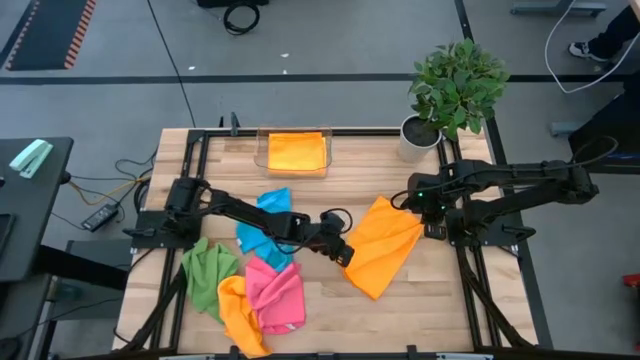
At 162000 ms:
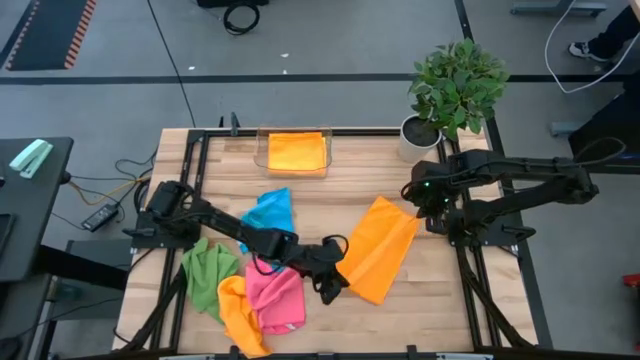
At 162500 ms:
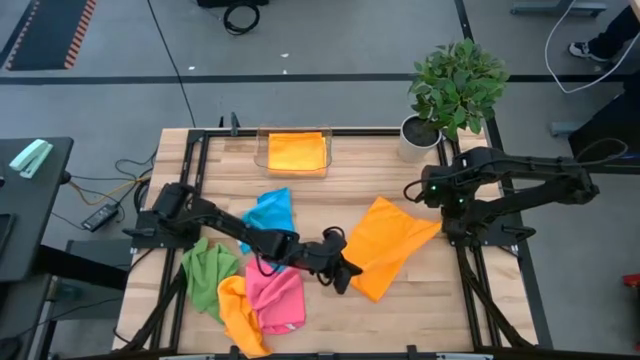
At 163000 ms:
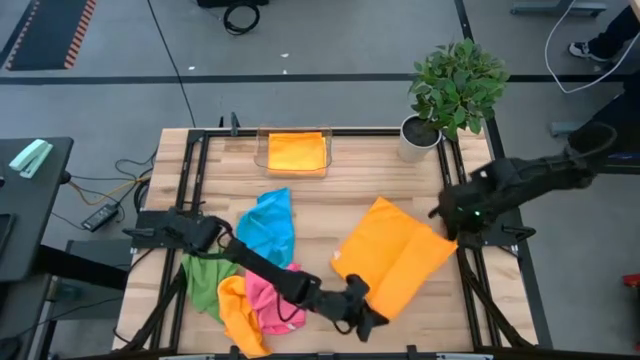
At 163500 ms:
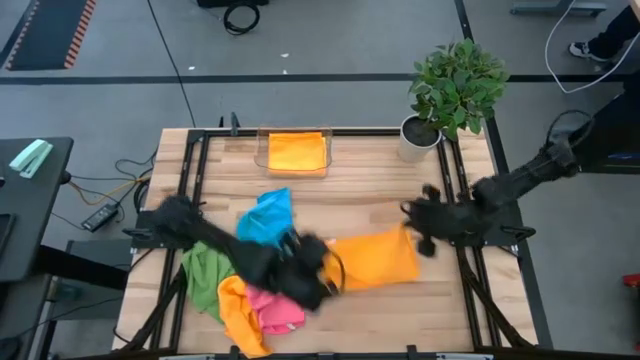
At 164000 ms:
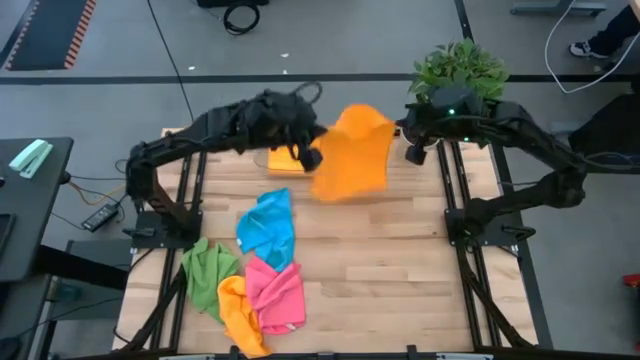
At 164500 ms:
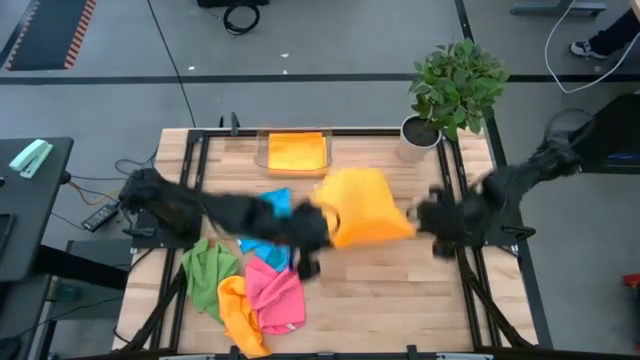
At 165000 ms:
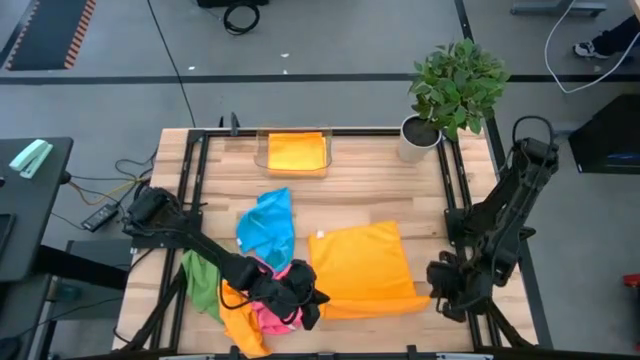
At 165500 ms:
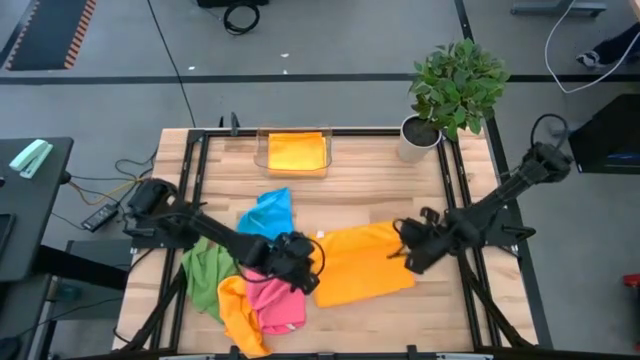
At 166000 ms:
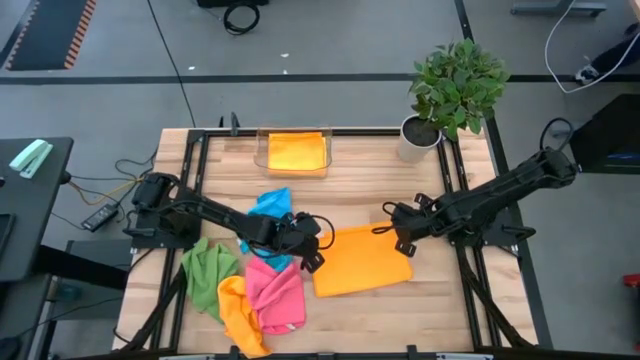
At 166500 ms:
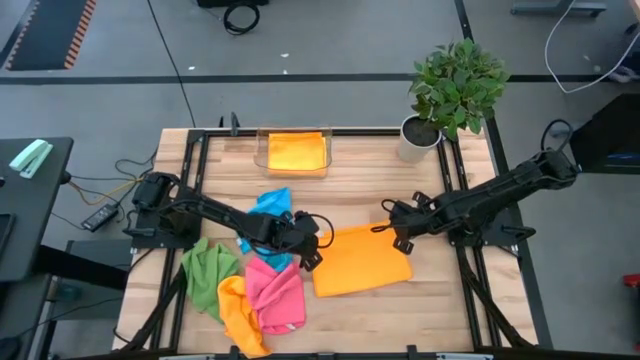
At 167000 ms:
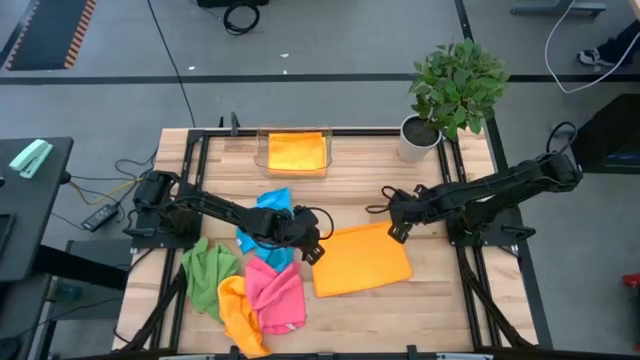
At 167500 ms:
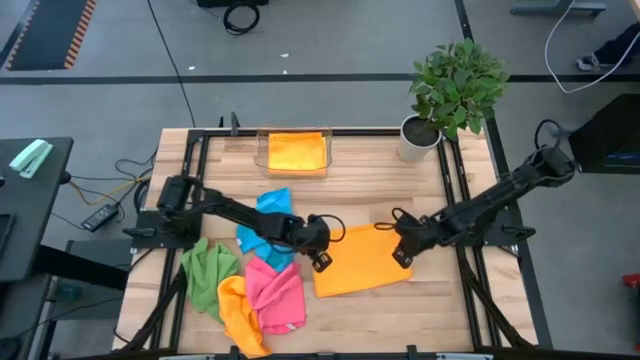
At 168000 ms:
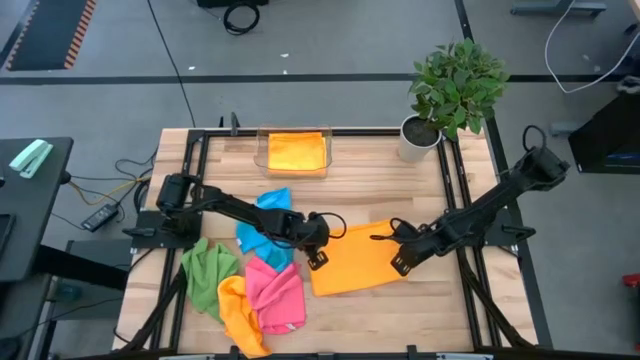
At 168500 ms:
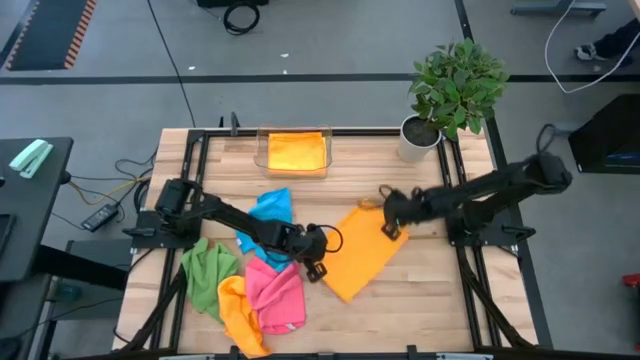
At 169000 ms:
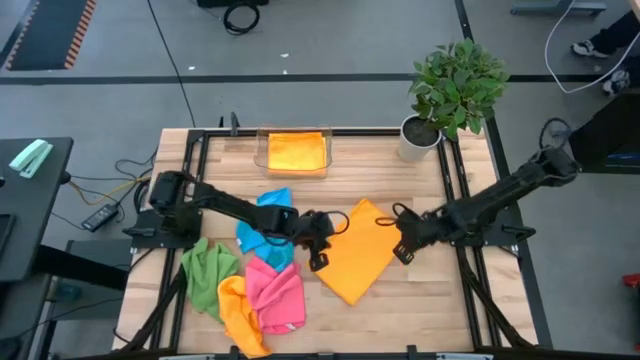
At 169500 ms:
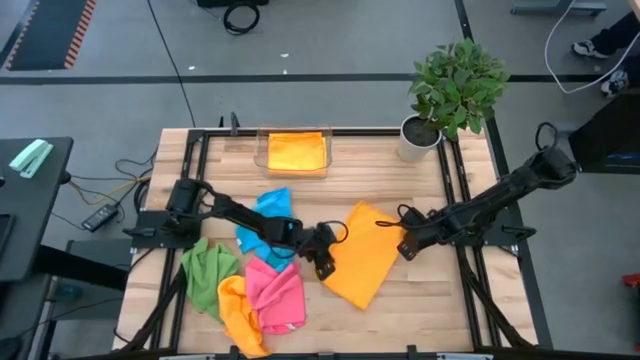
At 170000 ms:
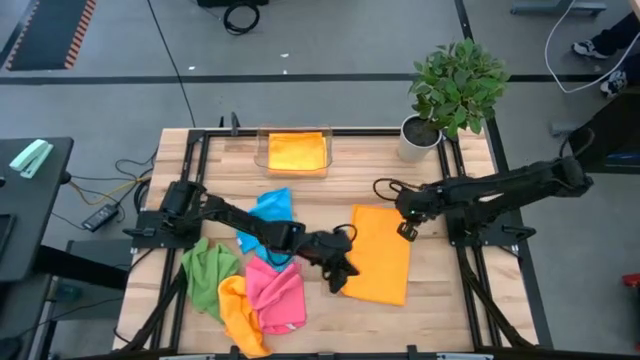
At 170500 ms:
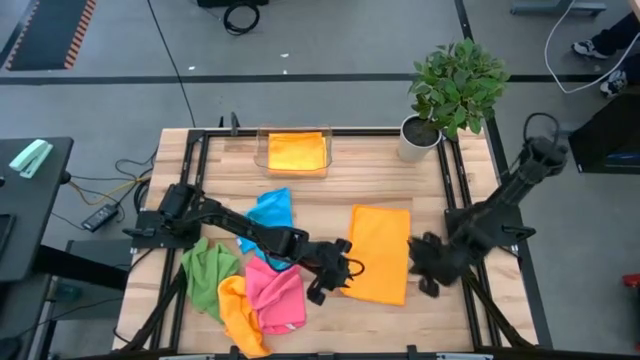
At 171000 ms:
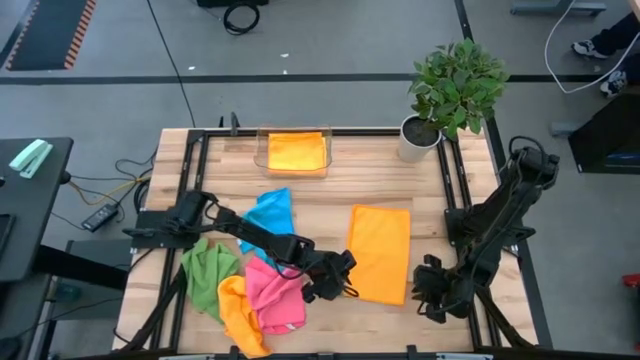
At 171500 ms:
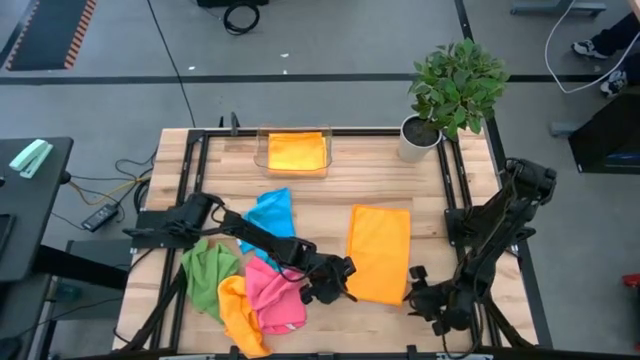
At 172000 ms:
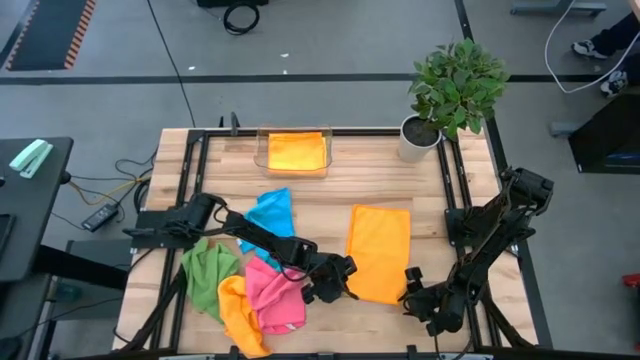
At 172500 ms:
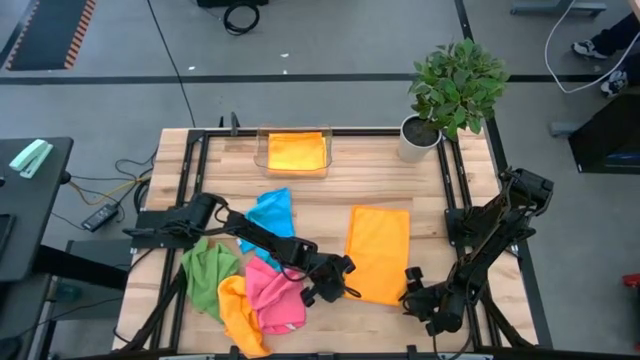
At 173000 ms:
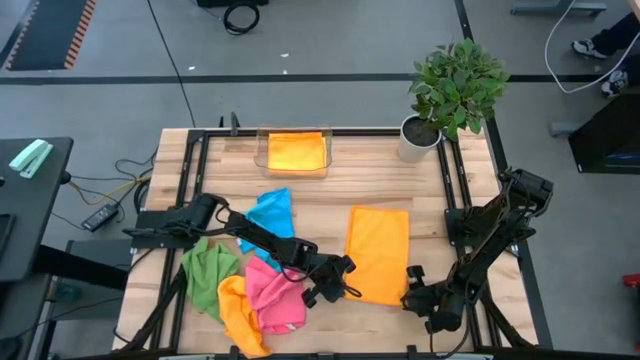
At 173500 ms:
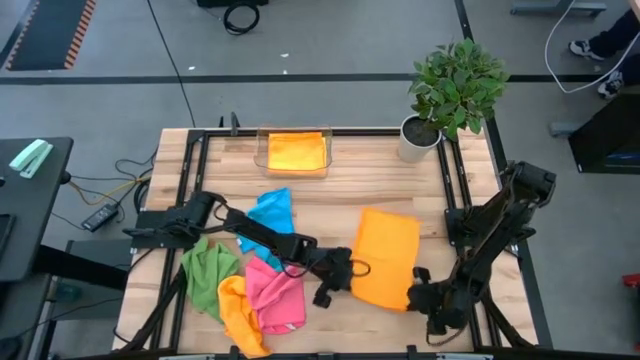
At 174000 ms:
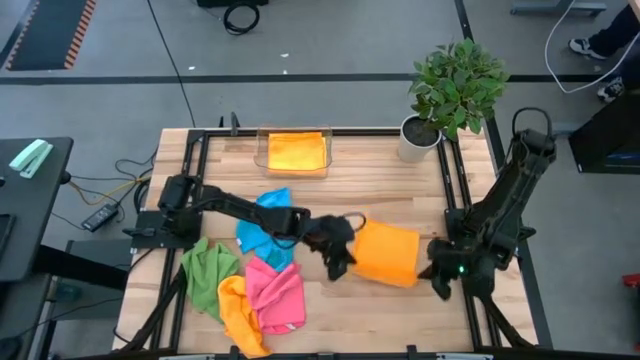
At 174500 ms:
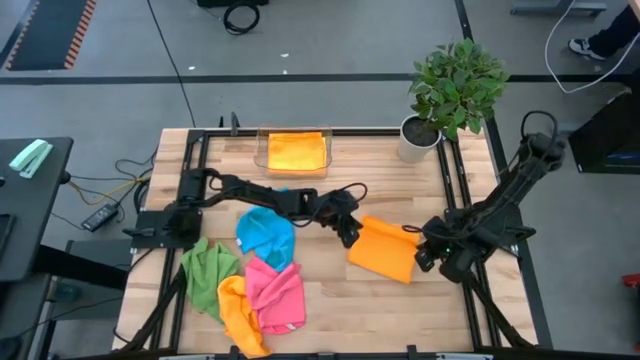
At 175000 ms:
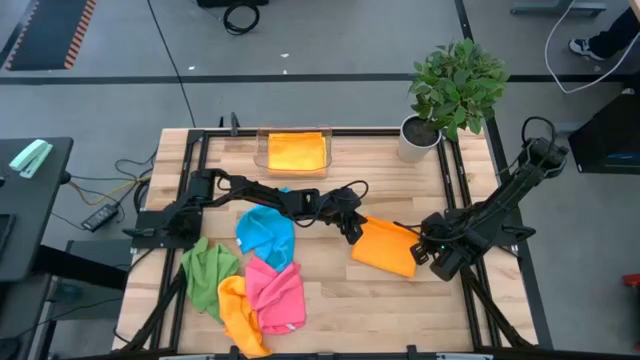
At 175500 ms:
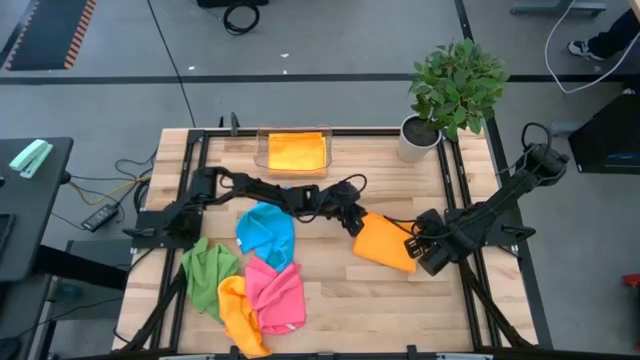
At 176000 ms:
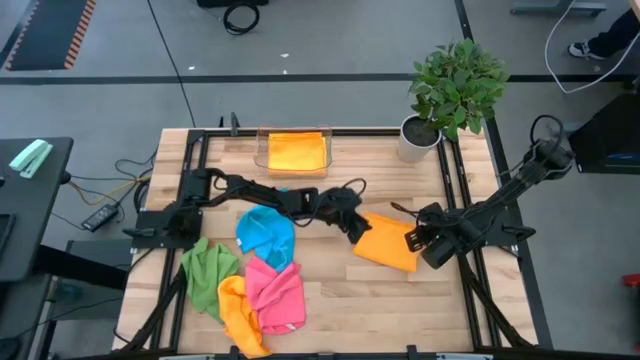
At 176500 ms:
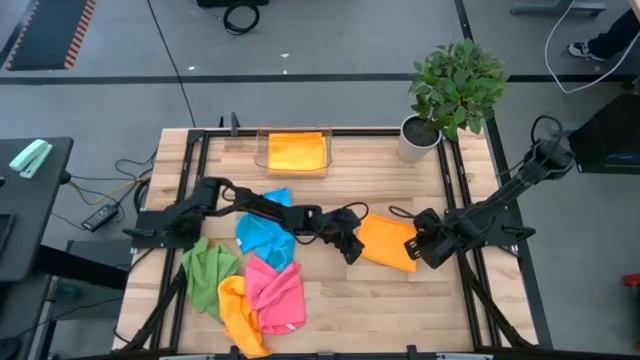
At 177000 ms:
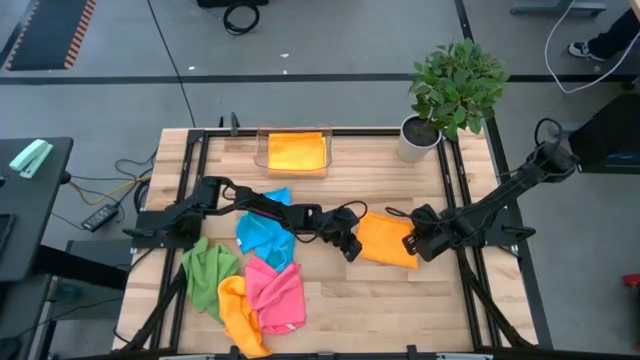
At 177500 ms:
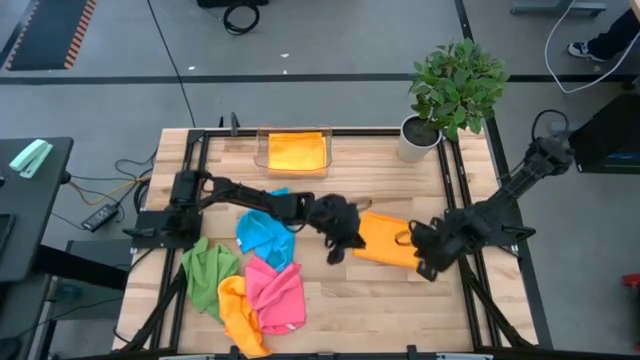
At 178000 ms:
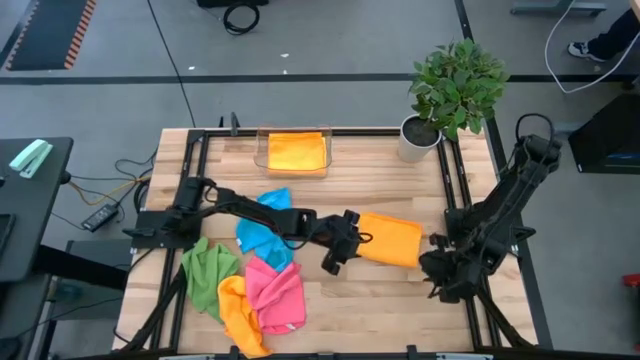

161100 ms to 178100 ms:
Task: Fold microfiber towels
Fold the orange microfiber towel

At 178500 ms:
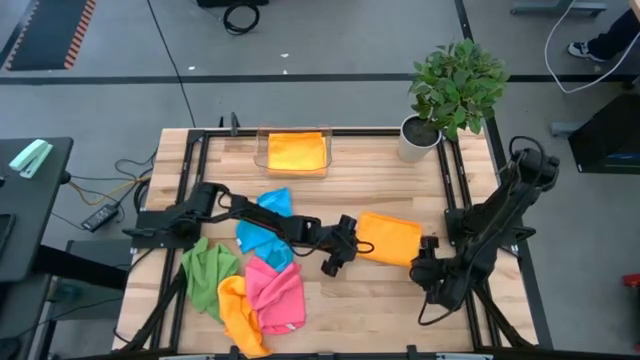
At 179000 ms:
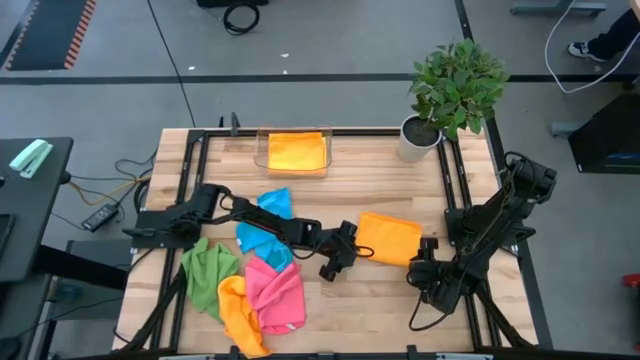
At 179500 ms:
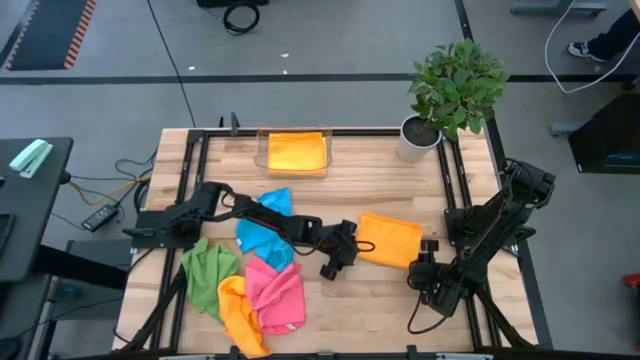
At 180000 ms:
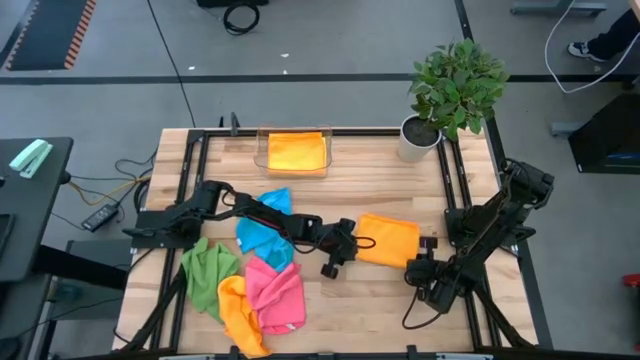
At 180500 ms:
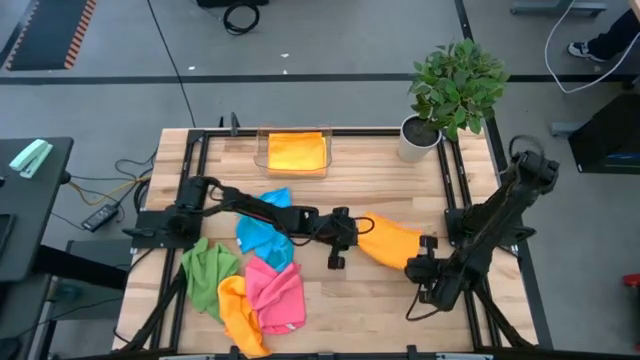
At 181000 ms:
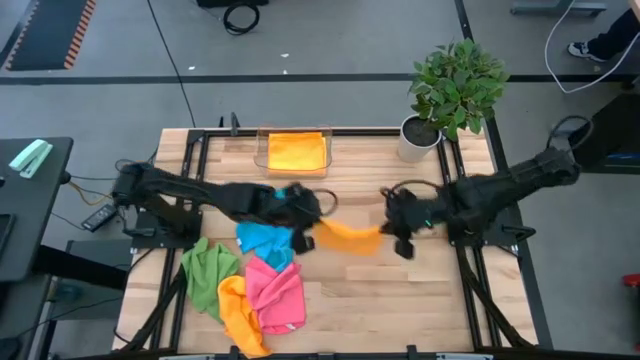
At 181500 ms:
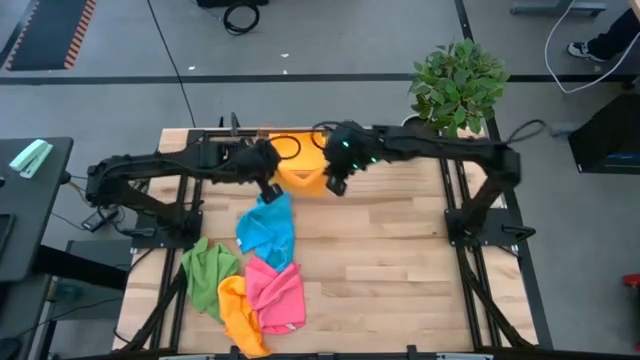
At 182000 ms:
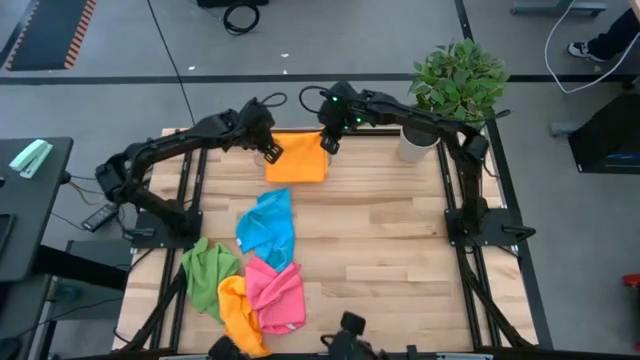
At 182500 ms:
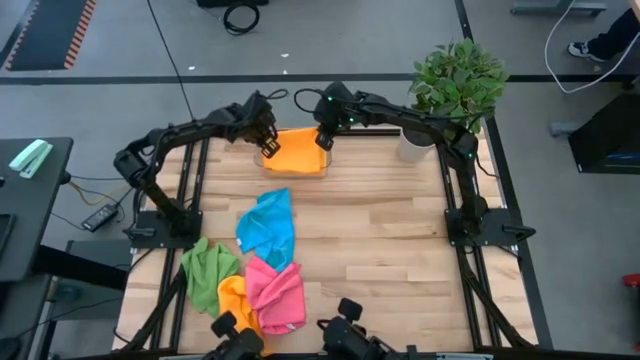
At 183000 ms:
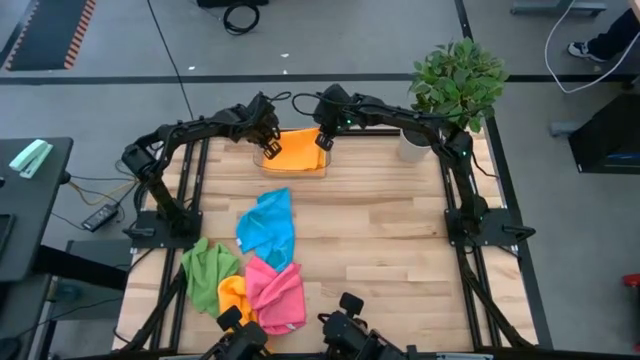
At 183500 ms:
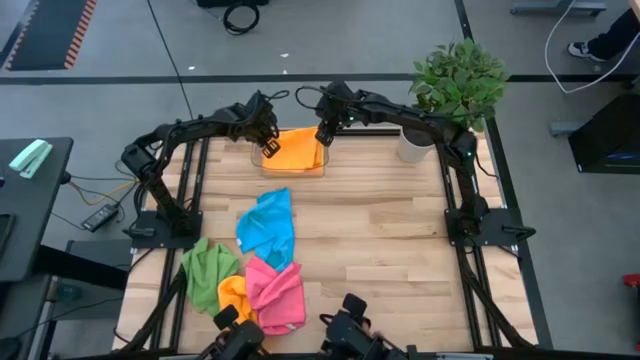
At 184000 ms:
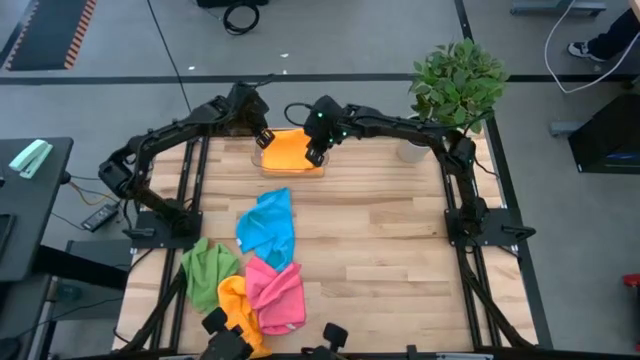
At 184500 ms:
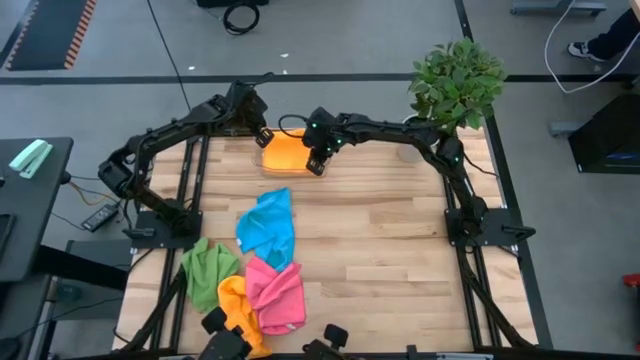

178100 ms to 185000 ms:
Put the orange microfiber towel into the transparent bin
